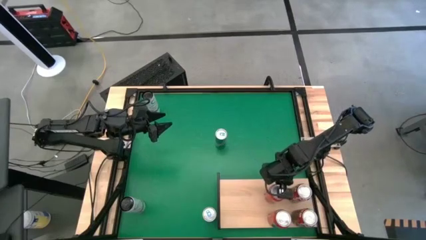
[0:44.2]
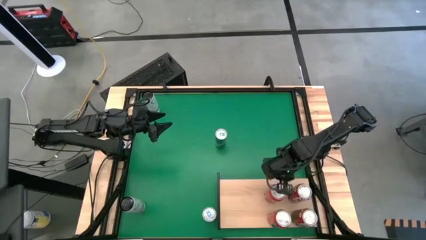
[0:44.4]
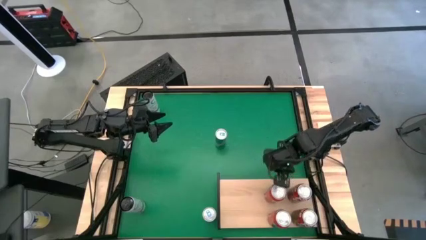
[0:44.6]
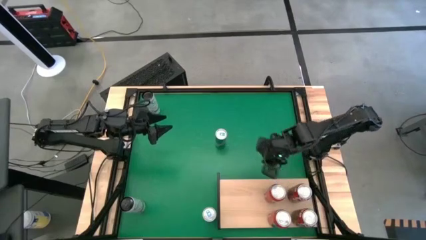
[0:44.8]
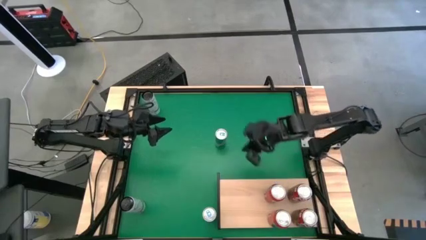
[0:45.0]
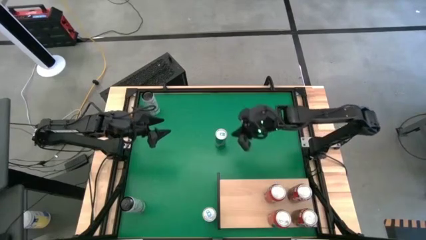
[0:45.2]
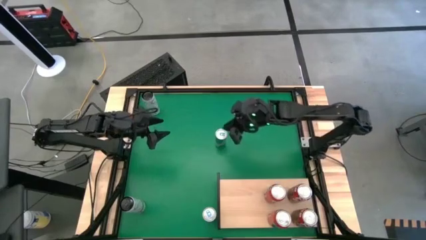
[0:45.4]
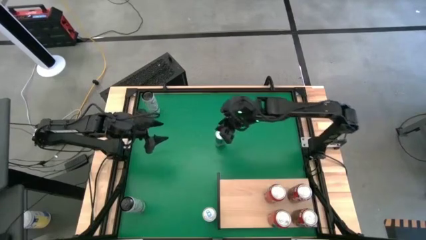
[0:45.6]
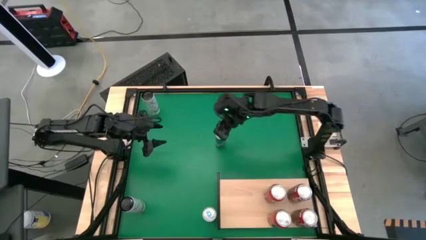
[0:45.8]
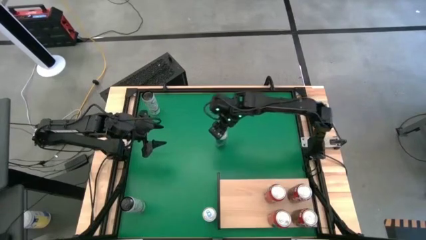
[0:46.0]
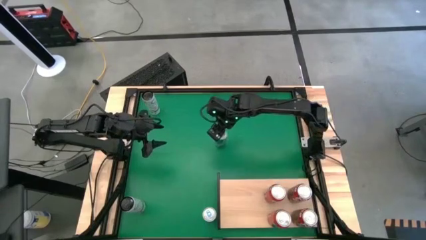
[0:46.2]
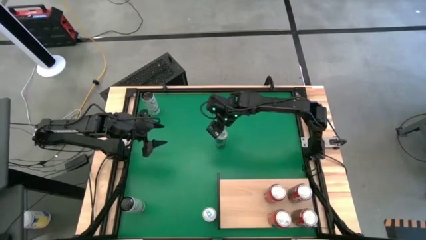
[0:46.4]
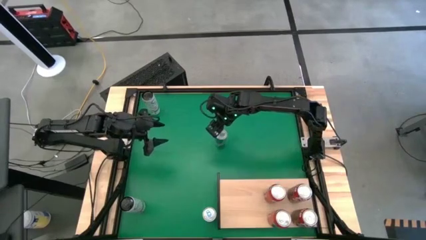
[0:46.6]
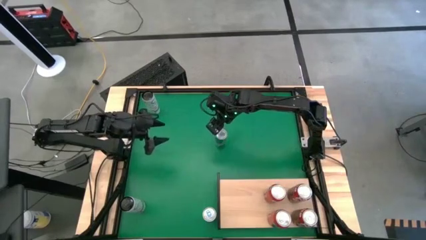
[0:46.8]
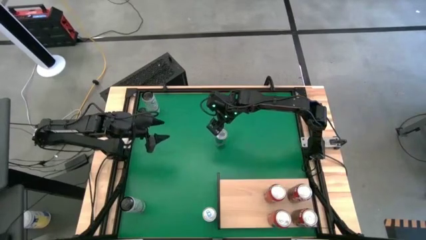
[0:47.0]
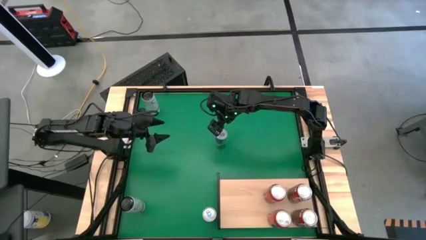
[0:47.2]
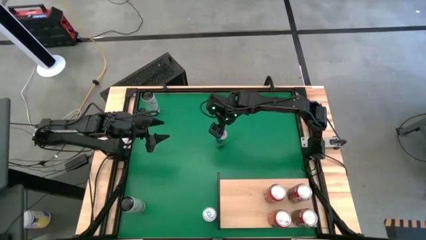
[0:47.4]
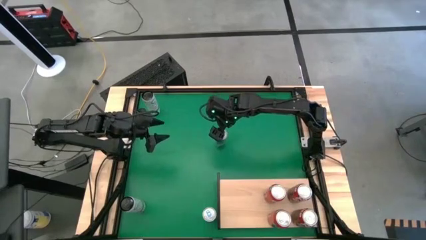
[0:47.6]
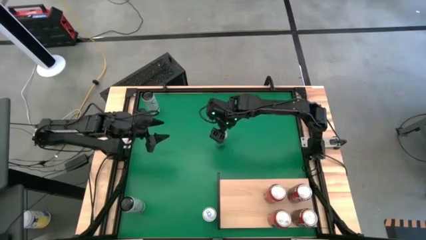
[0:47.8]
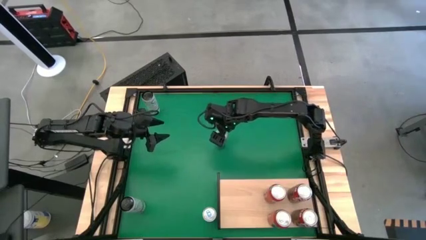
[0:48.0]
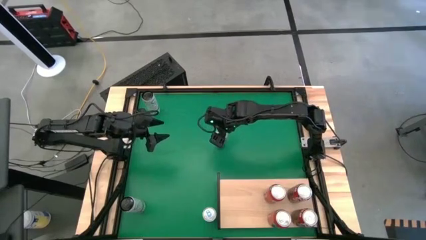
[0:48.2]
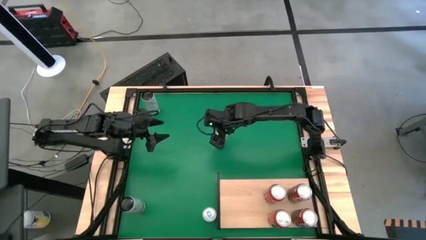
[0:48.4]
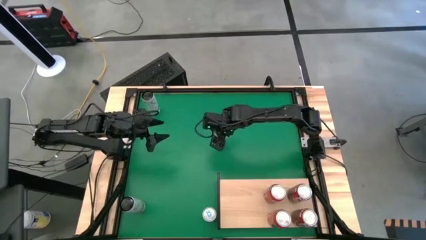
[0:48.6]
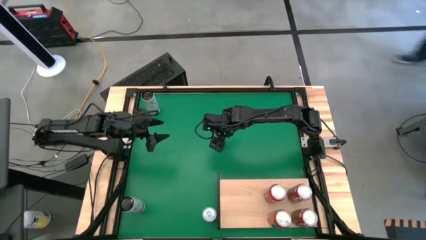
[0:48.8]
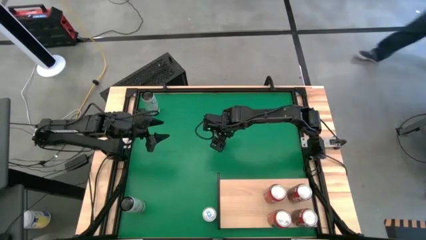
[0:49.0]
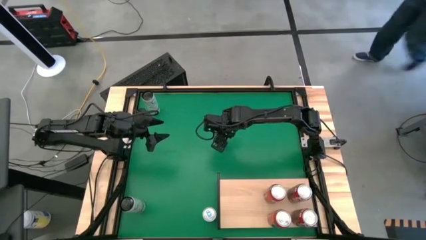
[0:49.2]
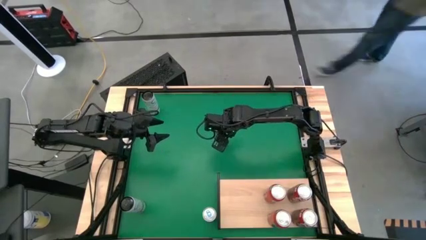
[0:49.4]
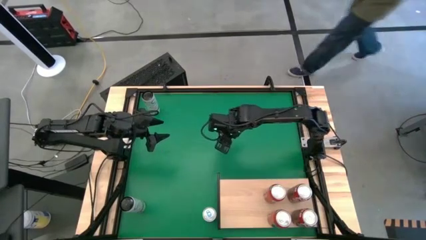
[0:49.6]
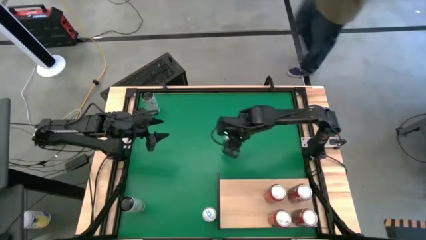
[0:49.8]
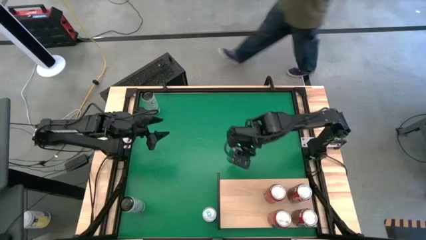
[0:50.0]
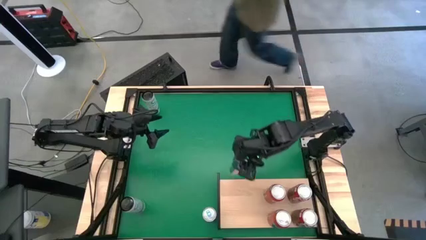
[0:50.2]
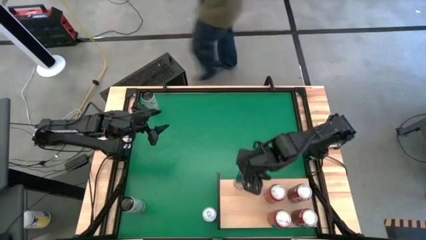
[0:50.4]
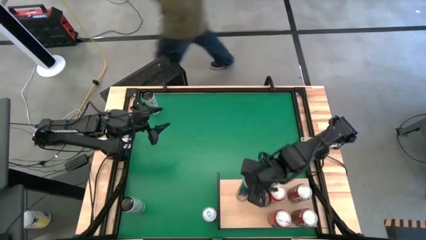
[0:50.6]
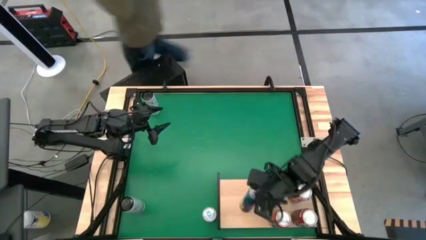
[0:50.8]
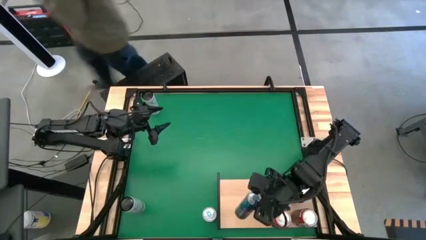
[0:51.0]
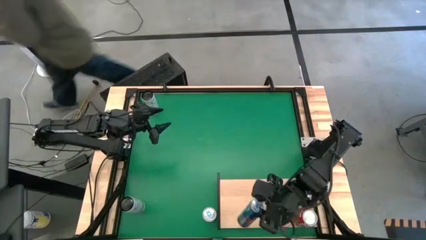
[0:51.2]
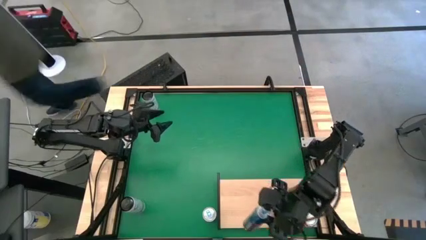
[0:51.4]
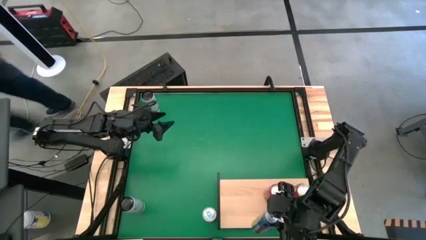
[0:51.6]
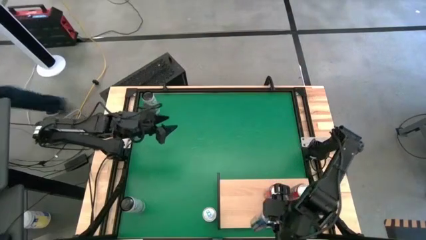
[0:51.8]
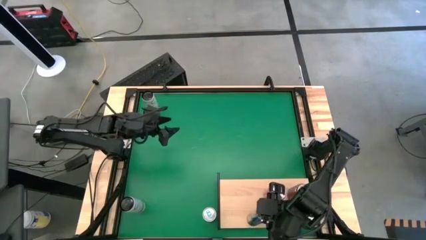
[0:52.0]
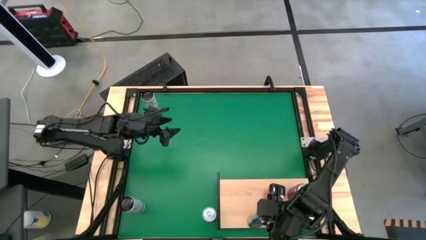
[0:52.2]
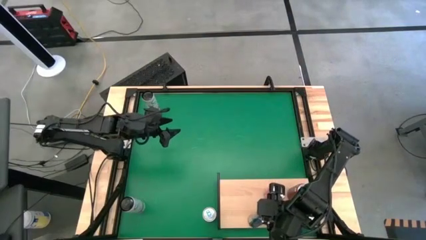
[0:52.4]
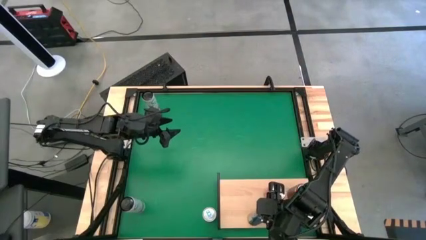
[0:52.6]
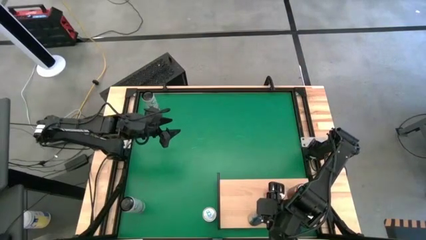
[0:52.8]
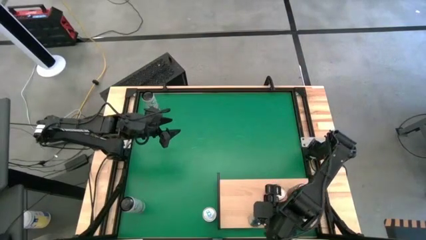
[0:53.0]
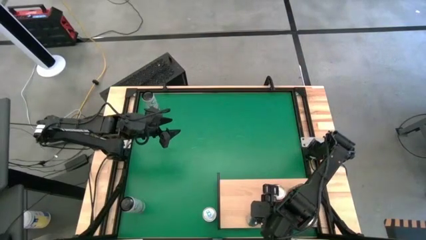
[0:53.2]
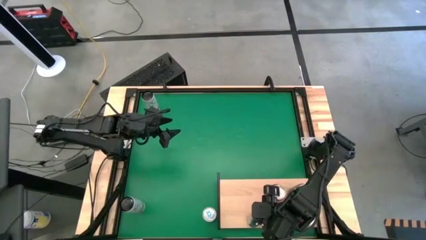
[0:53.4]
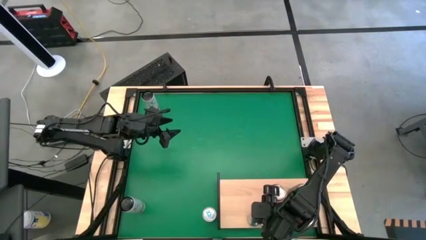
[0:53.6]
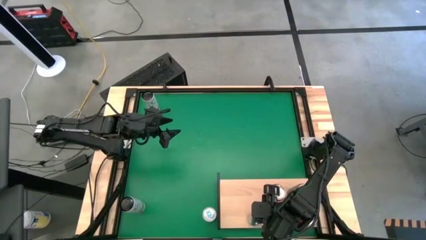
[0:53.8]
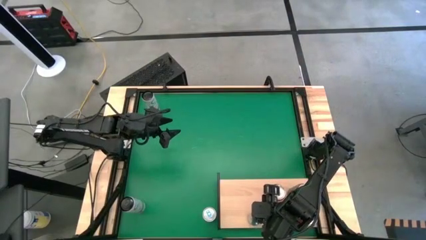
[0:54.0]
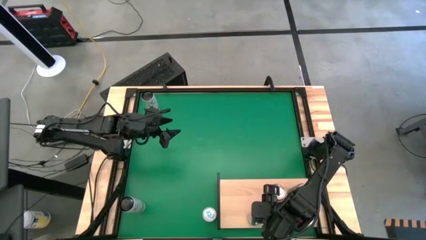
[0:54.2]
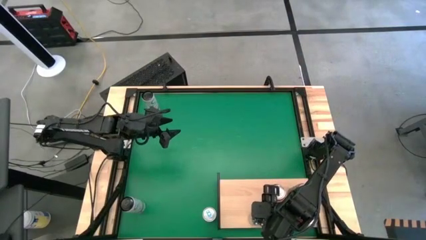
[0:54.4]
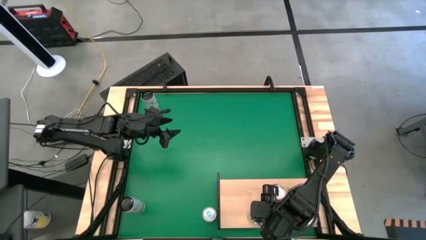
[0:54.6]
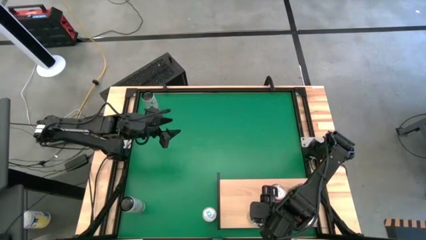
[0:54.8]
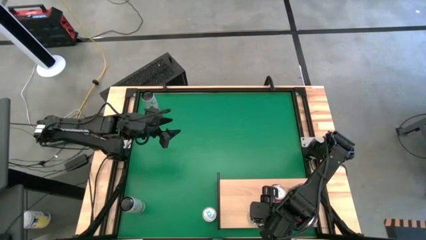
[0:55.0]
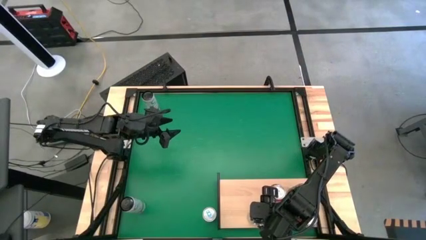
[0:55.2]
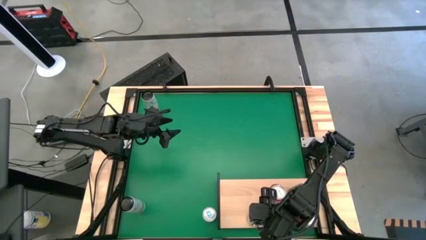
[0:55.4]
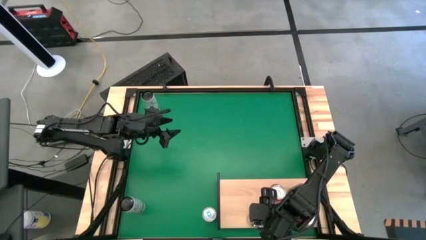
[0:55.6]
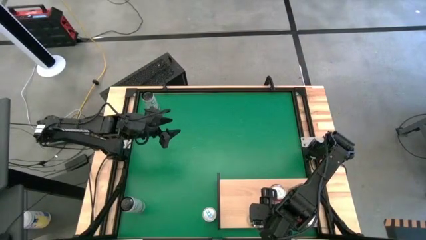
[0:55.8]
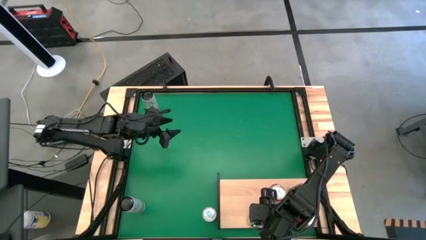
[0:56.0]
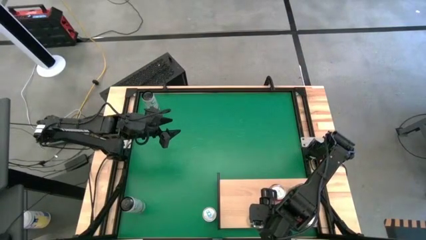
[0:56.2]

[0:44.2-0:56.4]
Task: Place canned beverage on shelf
Put the top blue soda can on the shelf
